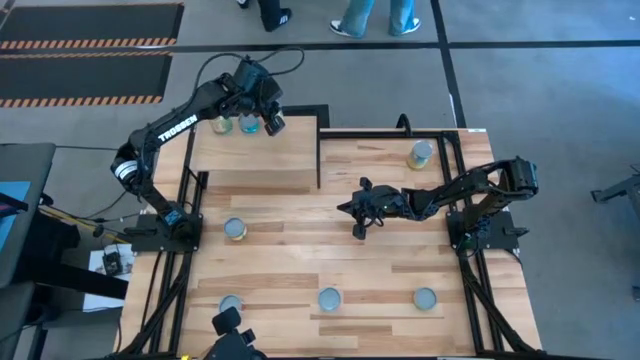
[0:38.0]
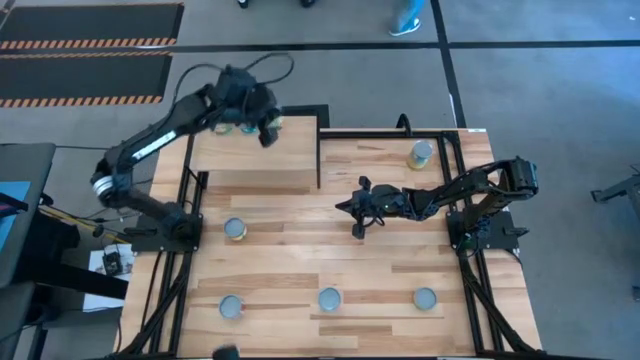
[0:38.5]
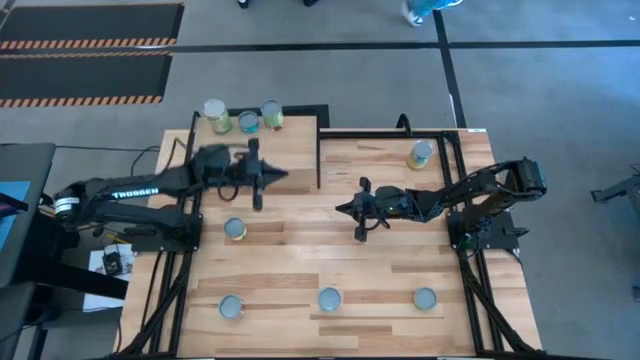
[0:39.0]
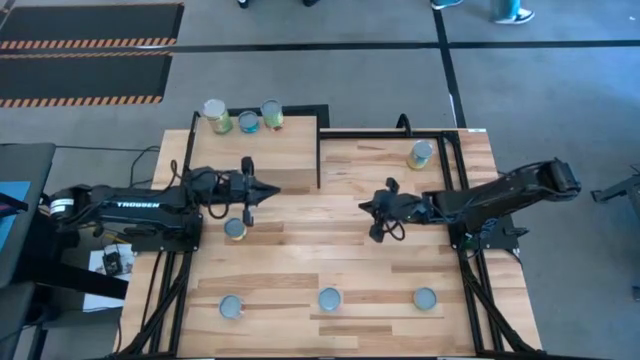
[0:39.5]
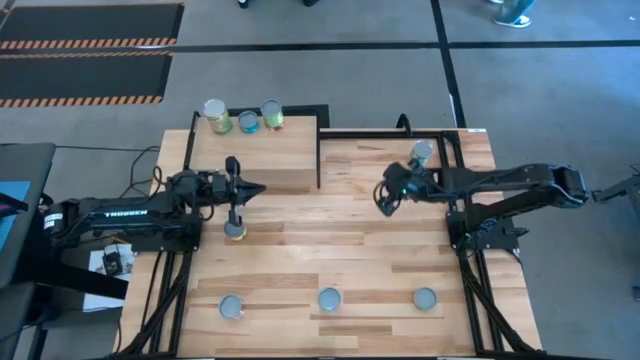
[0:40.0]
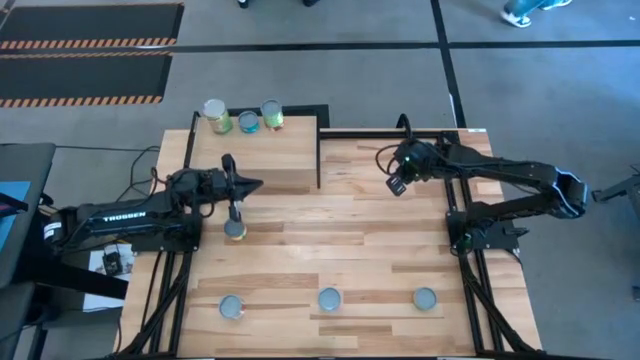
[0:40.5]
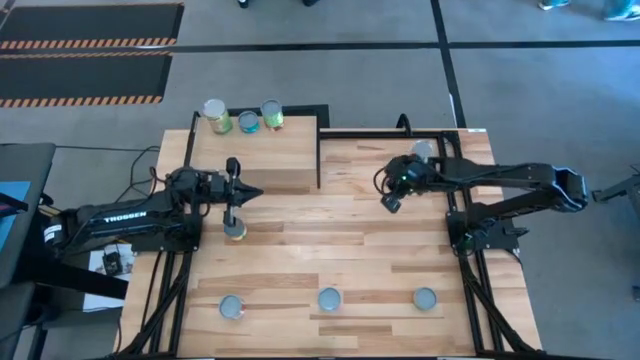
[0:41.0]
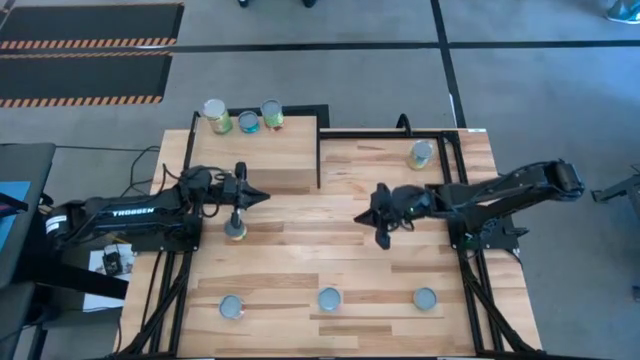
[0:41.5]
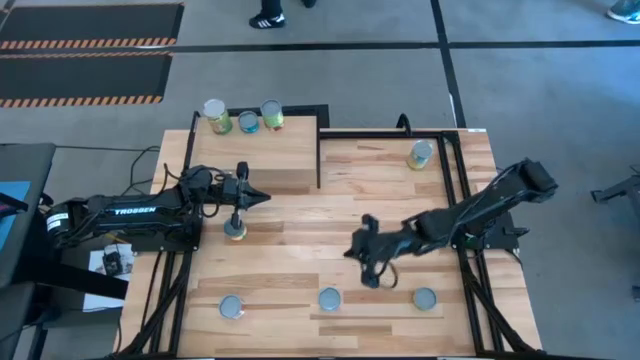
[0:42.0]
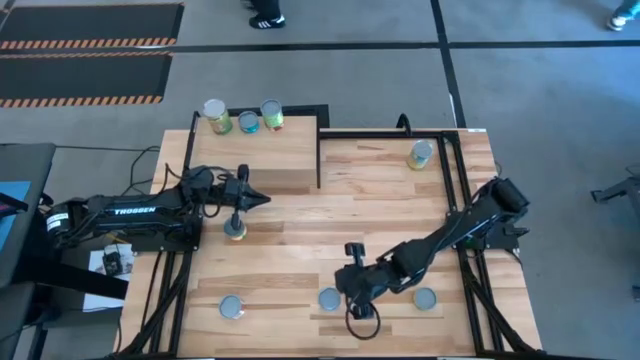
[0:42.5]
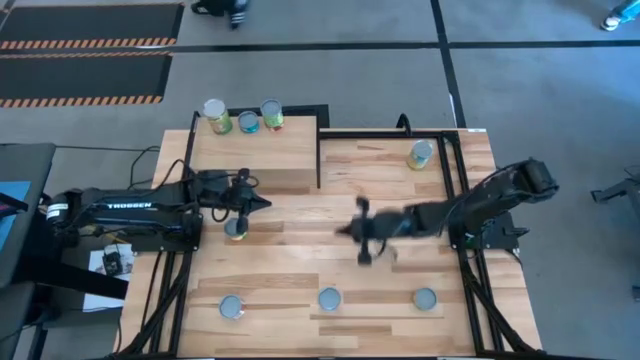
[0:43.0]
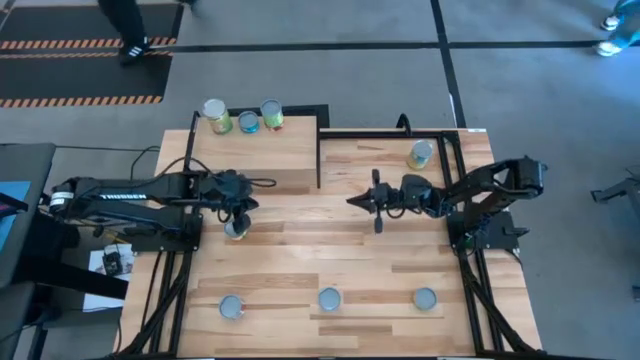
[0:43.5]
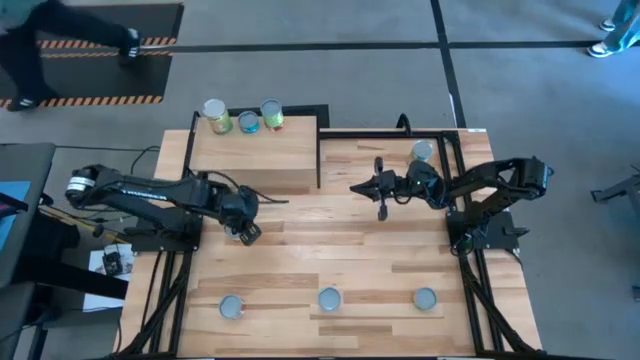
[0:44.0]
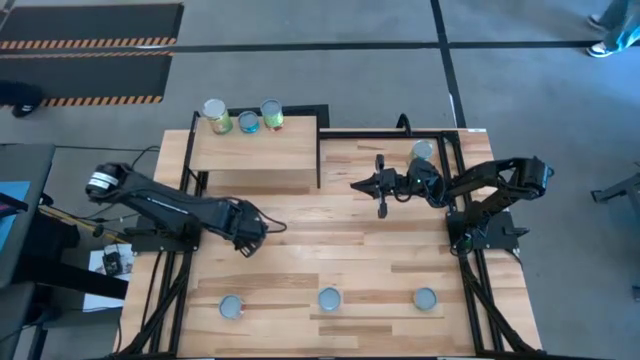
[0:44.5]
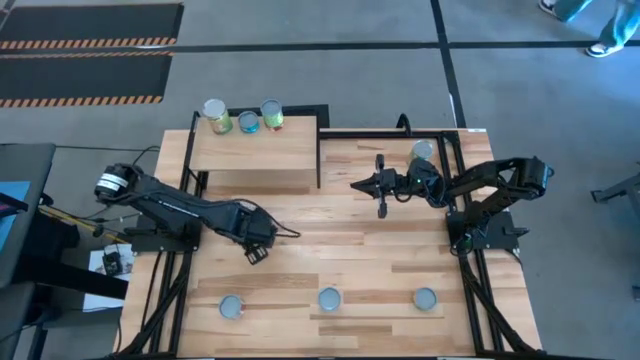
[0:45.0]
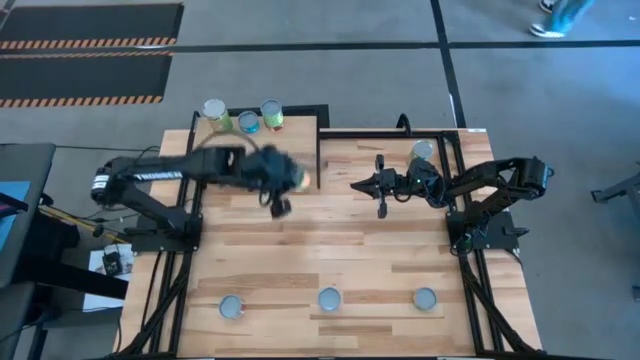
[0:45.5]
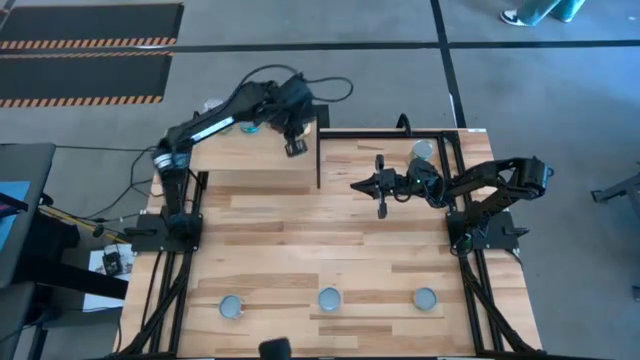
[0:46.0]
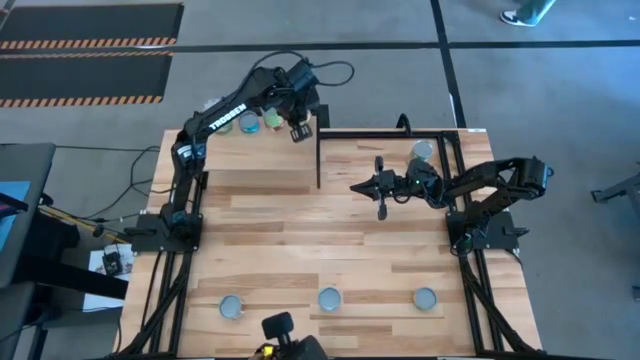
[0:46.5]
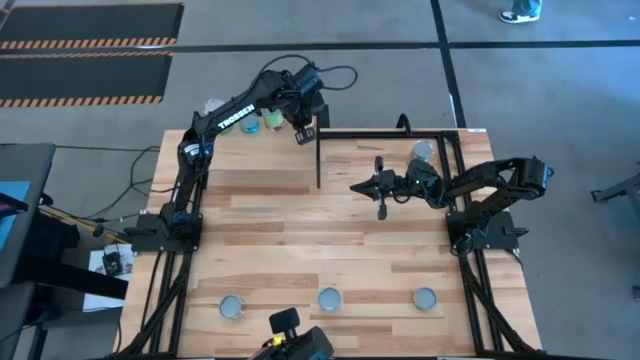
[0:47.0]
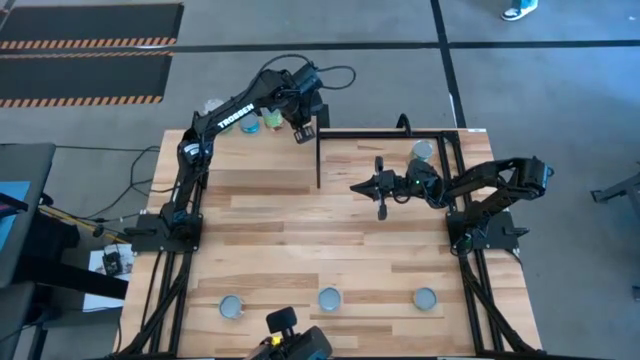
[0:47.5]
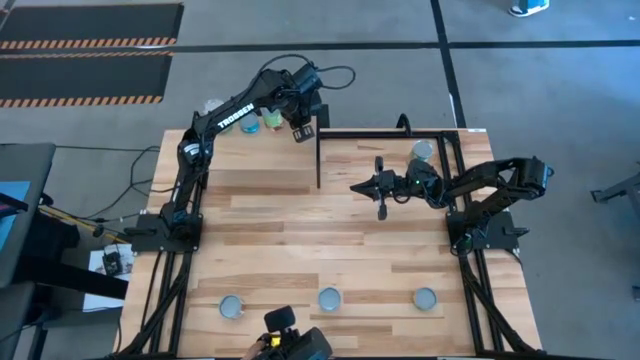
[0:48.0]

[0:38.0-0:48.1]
Task: Pick and place cans onto a shelf
Put the canned peaches on the shelf

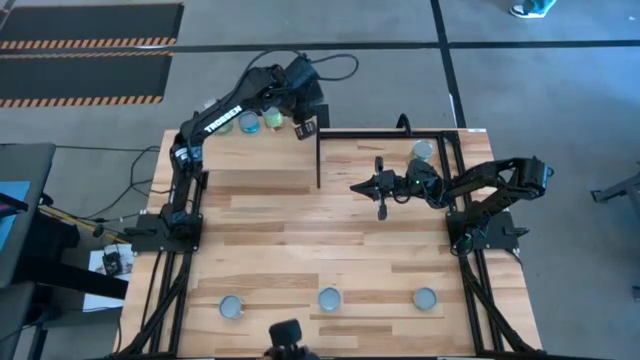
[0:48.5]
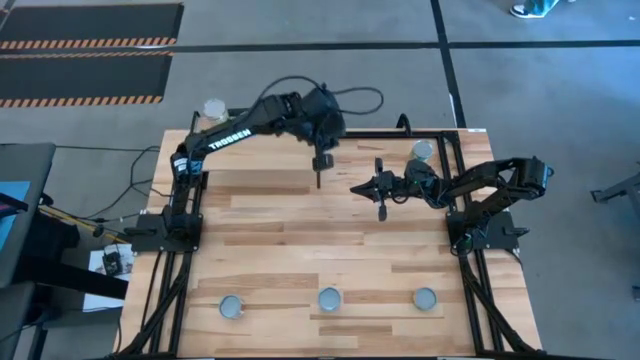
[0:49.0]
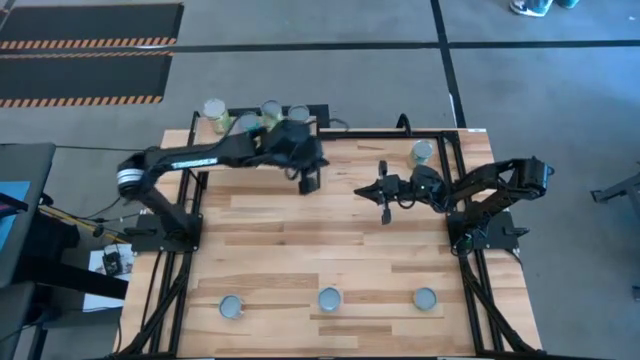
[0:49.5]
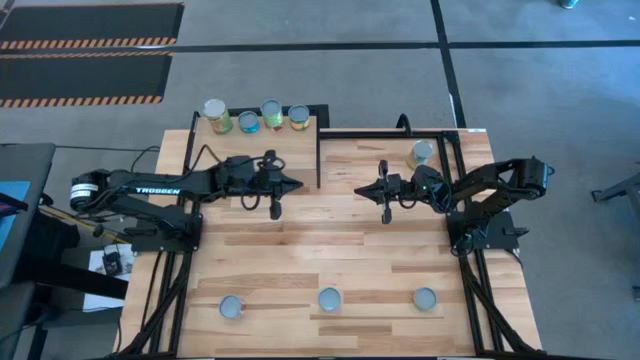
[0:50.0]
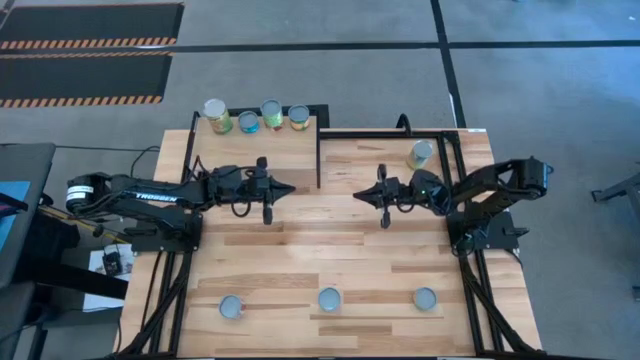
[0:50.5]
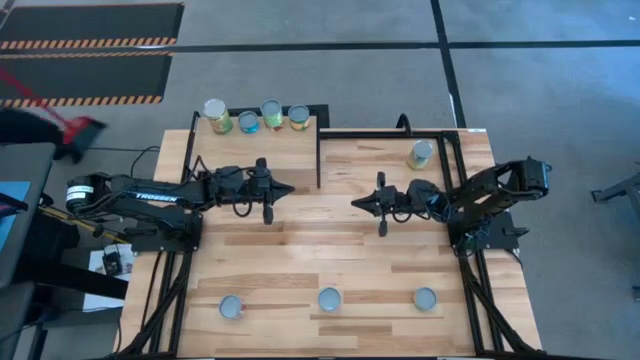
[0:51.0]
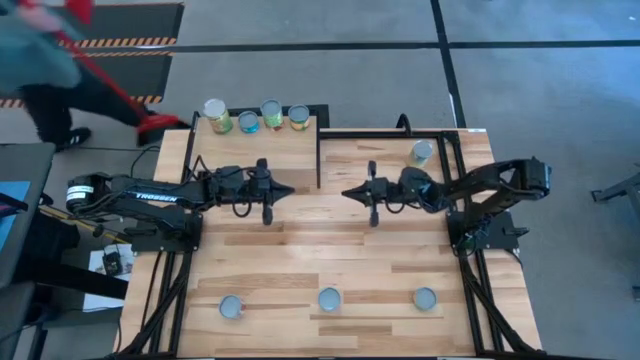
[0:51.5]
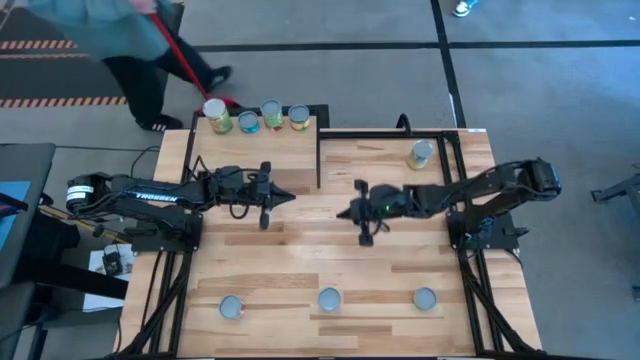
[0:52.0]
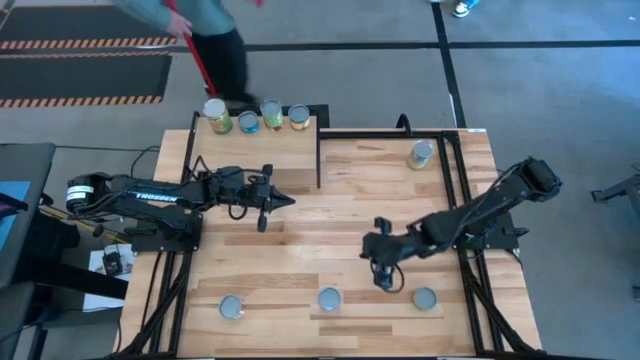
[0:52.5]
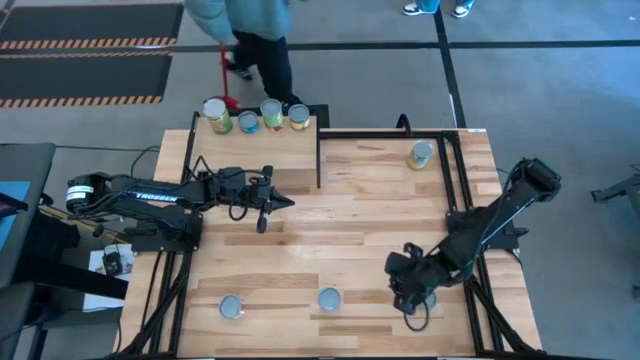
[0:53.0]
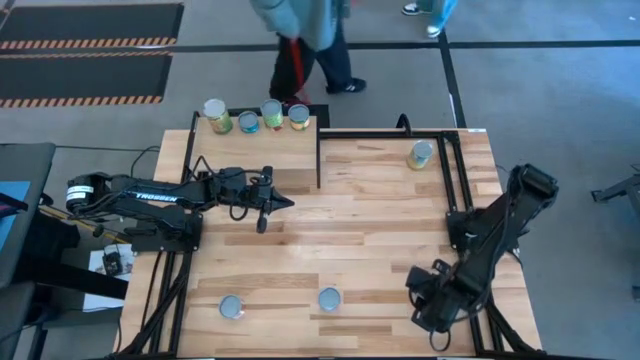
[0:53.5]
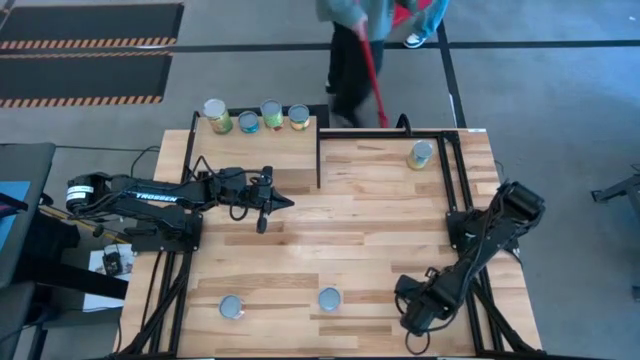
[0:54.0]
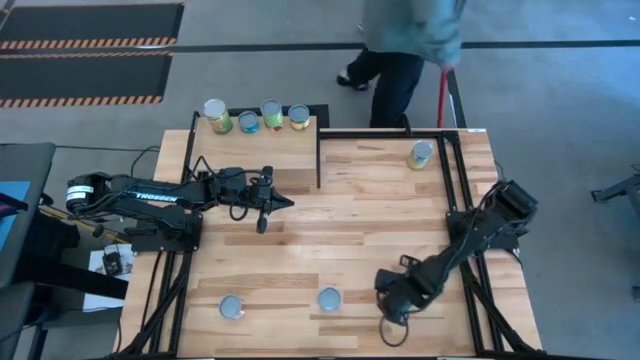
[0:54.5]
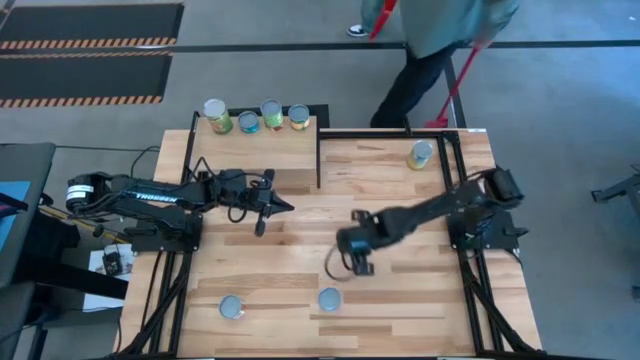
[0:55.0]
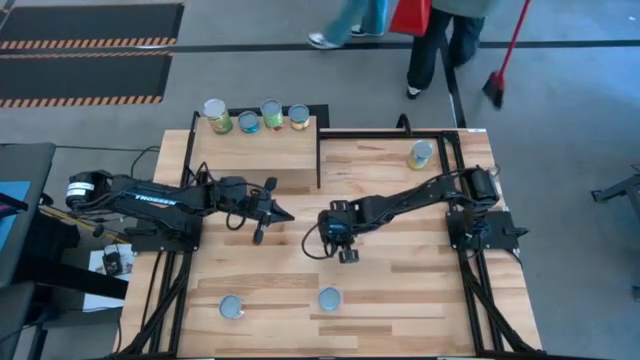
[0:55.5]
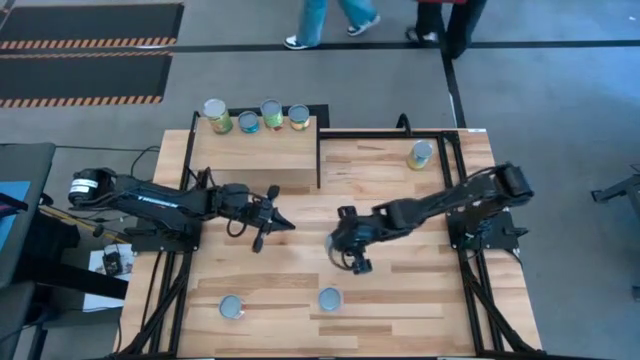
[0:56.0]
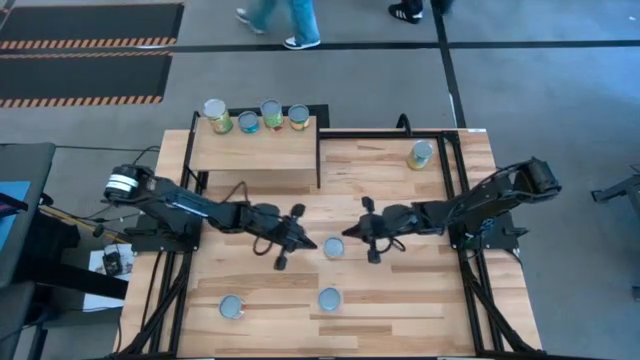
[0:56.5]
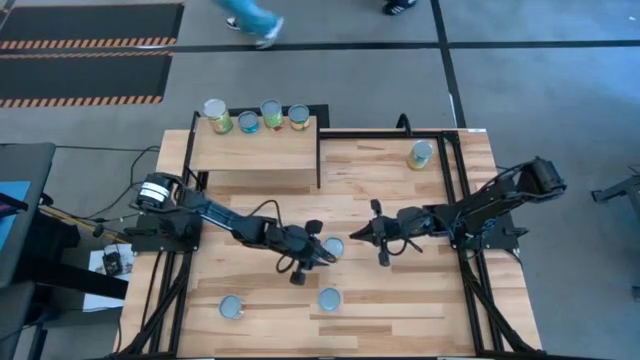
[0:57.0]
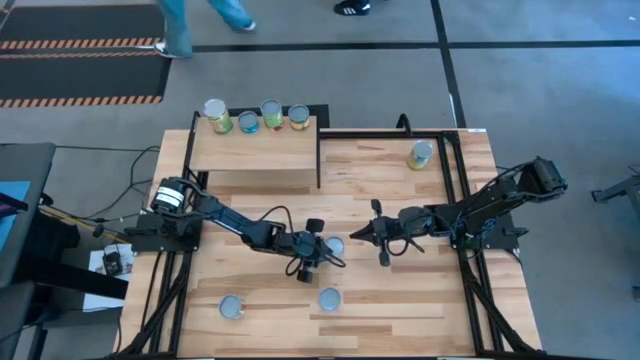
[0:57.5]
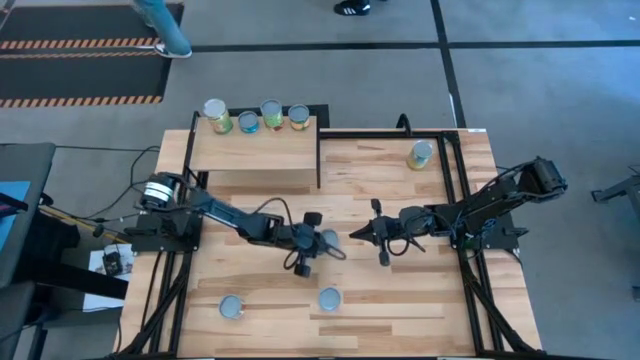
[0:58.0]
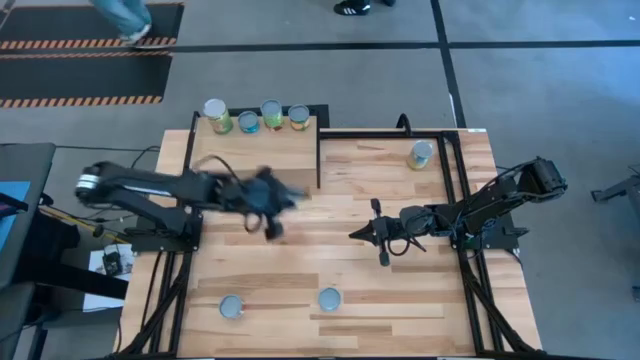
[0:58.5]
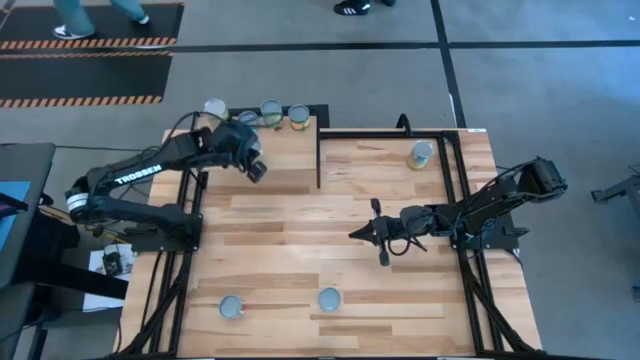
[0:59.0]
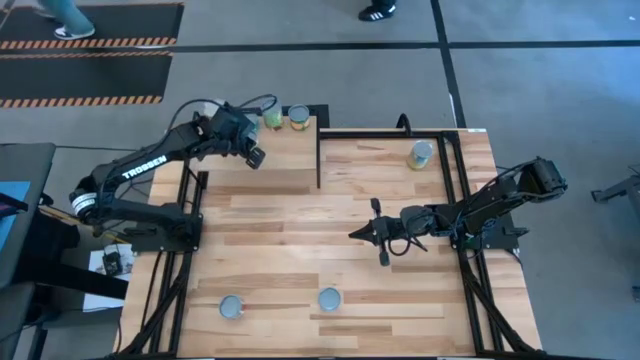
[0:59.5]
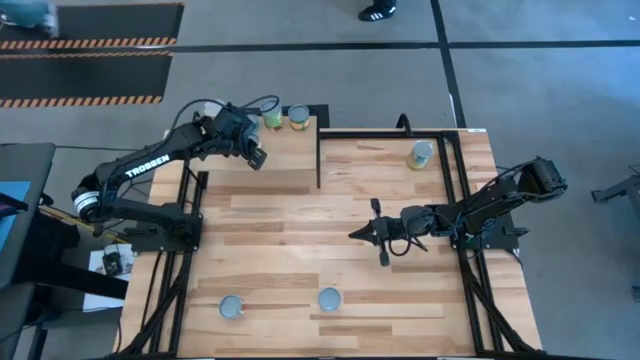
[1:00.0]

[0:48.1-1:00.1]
Put the canned mushrooms on the shelf
